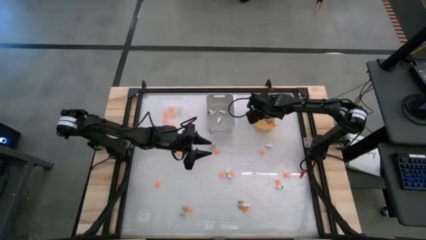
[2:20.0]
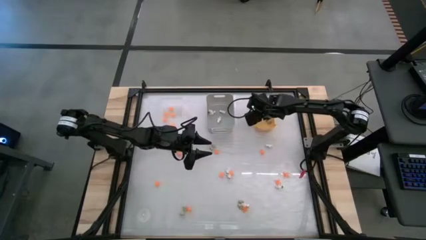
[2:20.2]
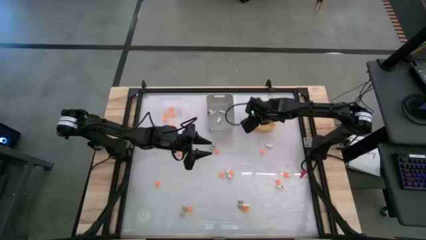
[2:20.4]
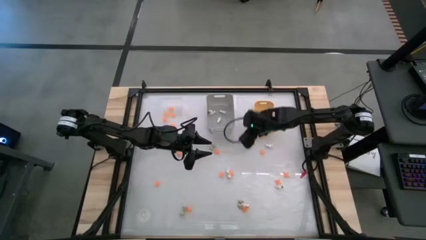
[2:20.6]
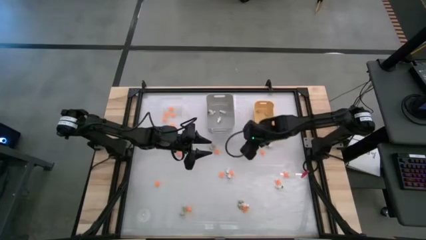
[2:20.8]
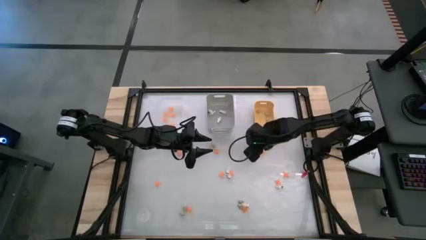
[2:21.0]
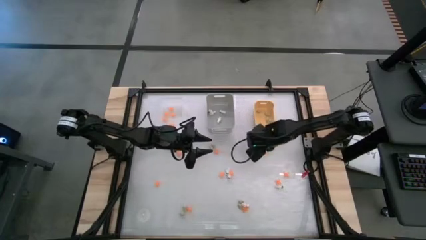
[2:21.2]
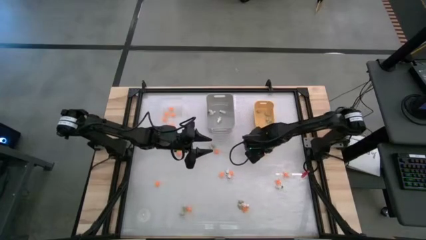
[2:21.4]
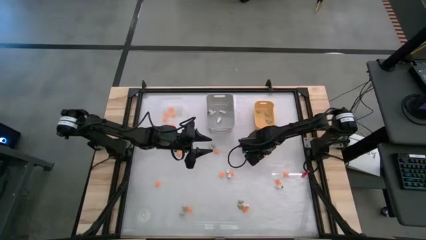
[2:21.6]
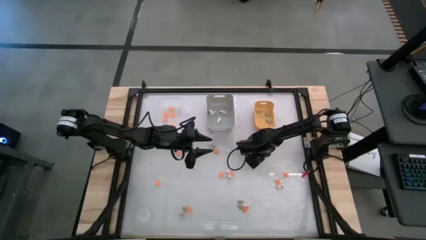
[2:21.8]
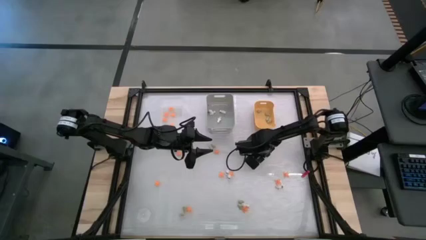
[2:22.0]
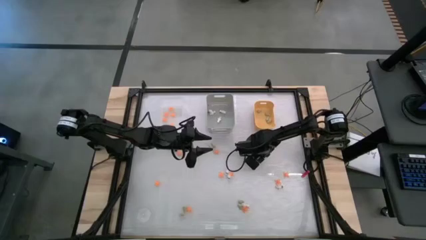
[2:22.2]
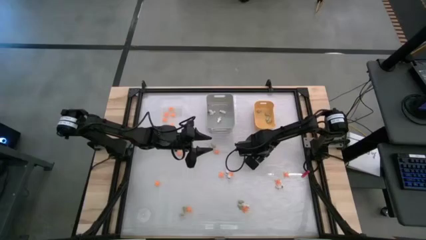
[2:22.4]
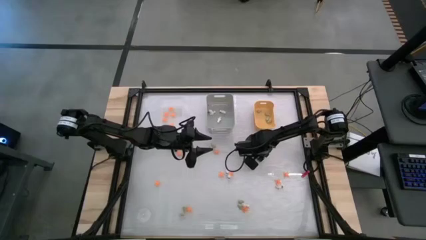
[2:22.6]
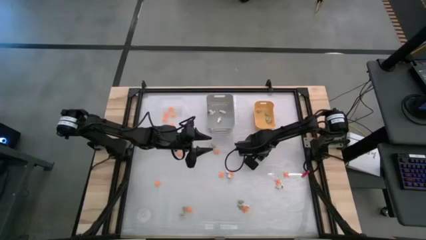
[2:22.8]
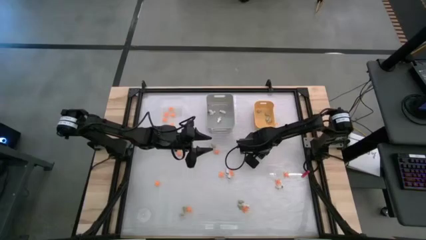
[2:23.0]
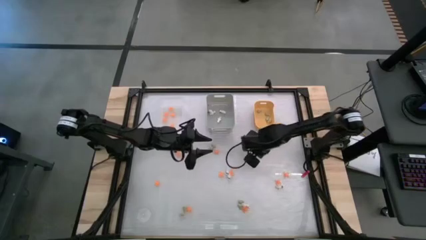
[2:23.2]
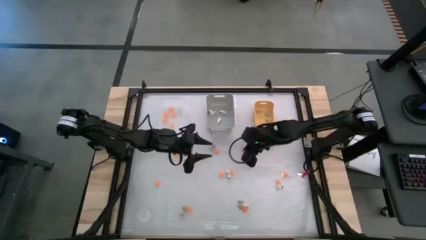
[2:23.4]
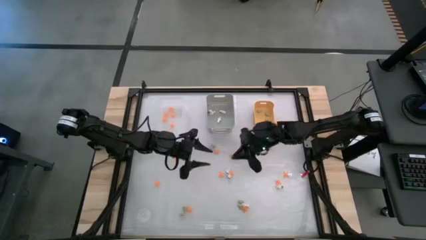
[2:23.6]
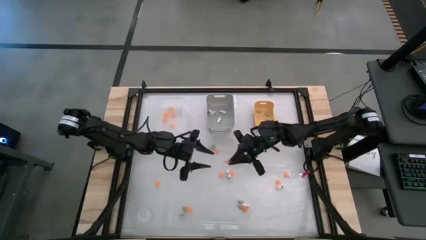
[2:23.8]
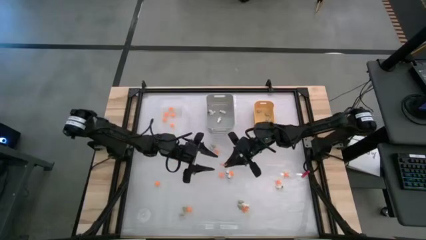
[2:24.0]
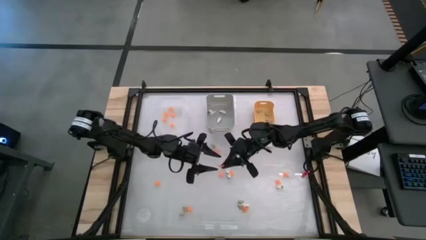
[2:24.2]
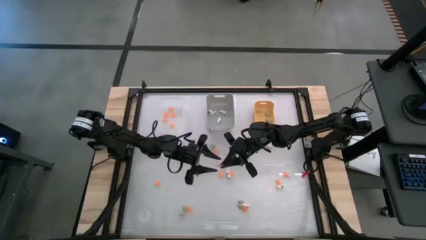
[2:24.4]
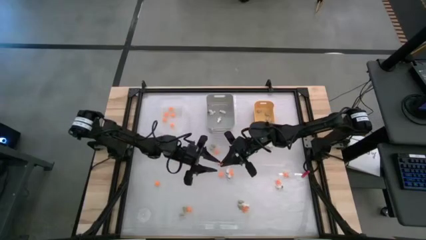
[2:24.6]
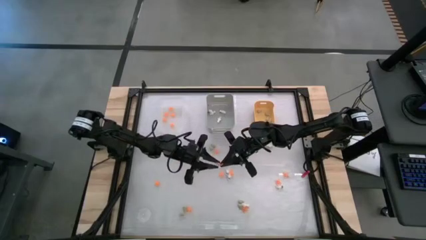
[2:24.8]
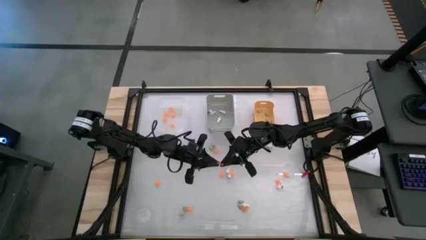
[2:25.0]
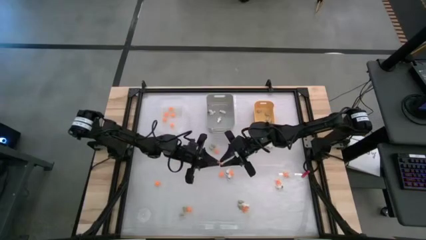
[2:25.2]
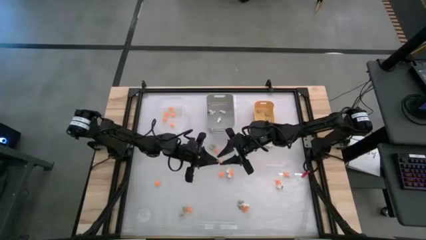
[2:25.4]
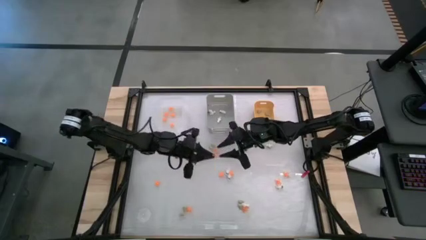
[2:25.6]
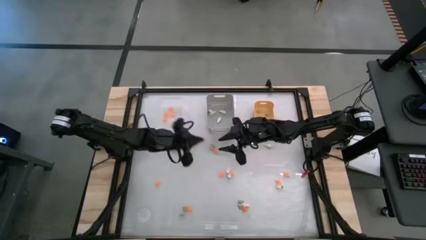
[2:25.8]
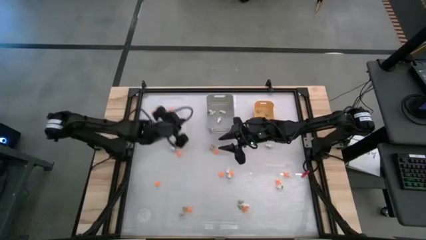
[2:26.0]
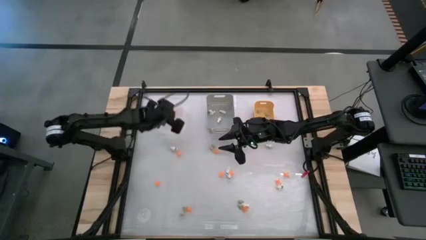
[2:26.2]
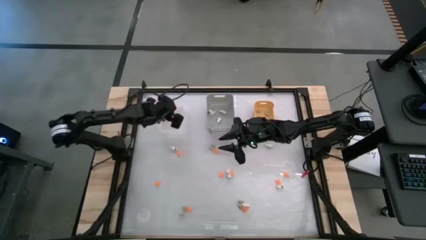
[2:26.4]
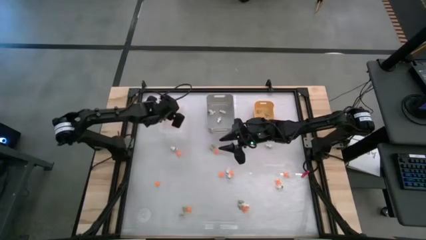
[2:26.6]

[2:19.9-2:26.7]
Task: Sort Halloween decoration
Put the orange spider toy into the transparent white bin

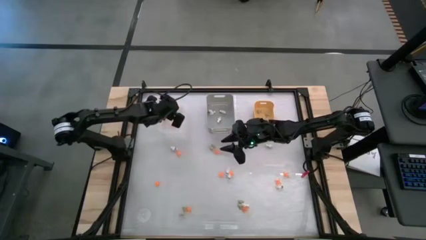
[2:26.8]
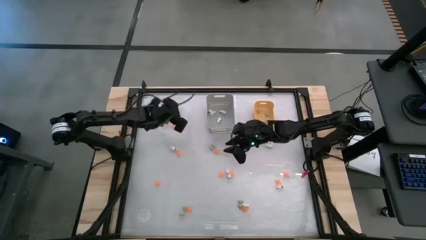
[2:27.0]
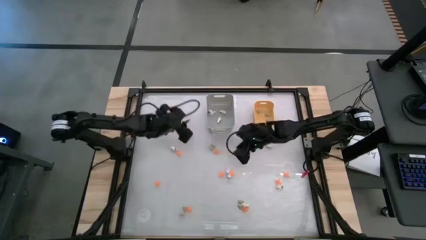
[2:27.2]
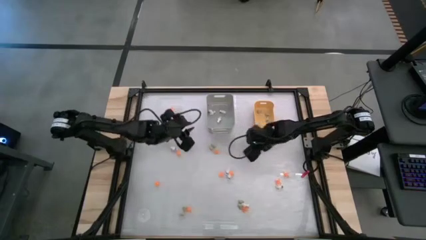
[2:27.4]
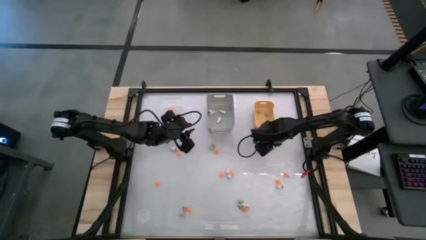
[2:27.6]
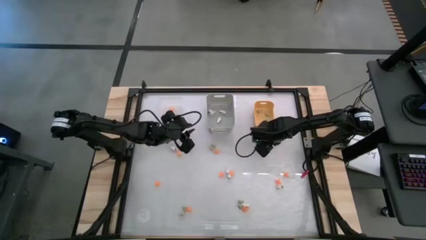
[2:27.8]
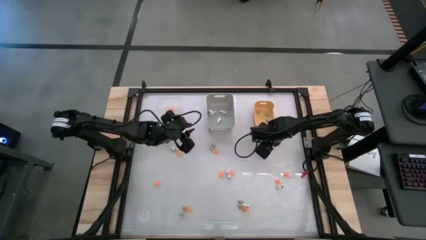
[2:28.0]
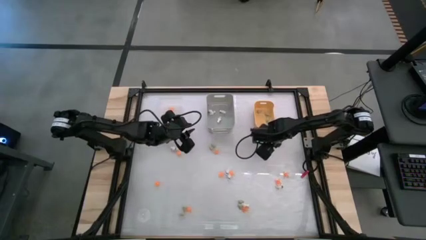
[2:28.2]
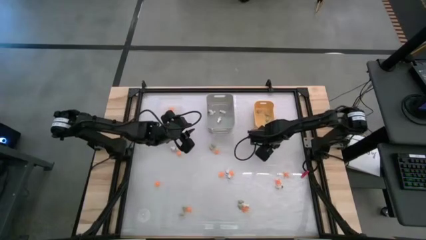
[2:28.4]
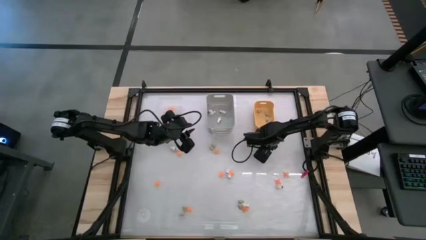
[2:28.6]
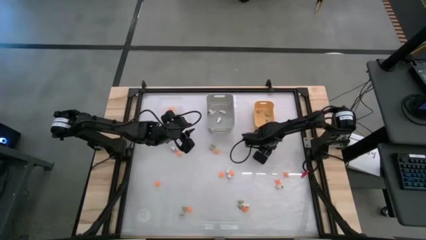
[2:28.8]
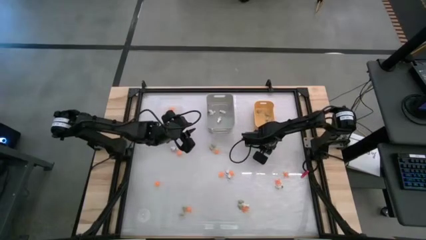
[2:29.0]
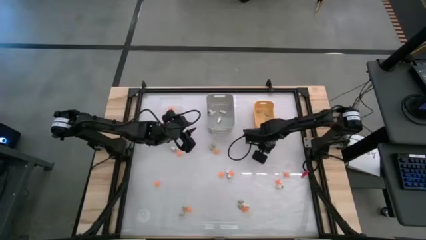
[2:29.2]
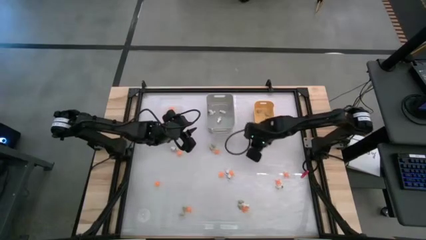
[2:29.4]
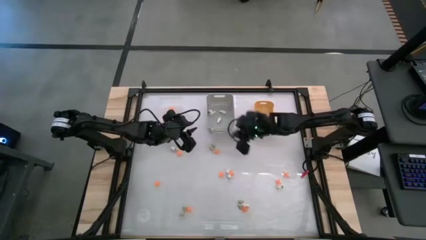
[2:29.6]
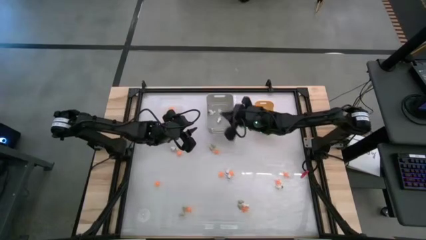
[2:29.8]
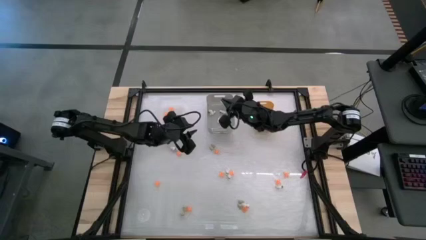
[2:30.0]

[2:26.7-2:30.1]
Put the white skeleton toy into the gray bin

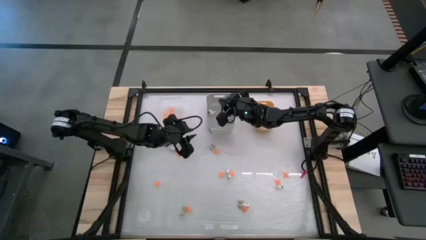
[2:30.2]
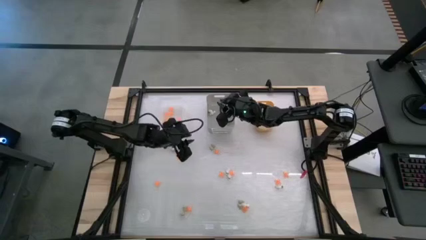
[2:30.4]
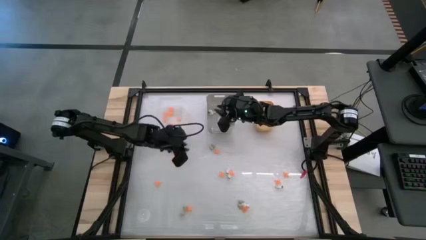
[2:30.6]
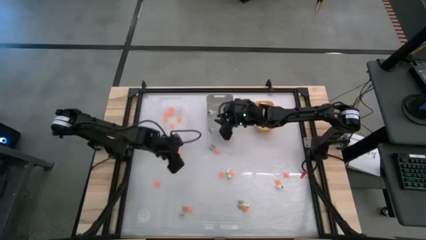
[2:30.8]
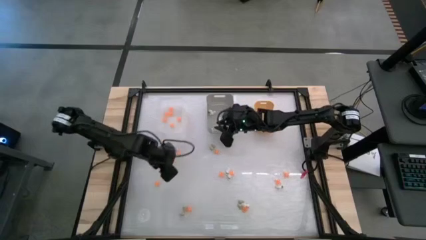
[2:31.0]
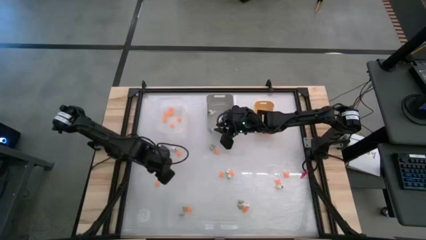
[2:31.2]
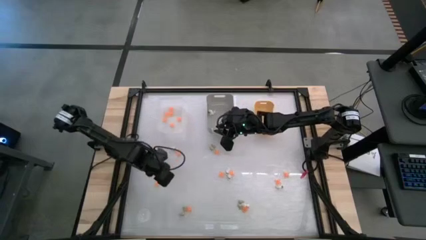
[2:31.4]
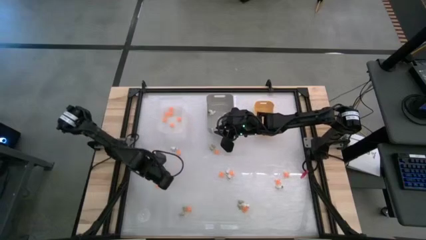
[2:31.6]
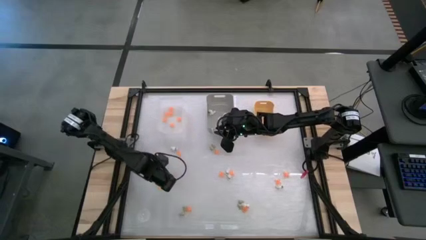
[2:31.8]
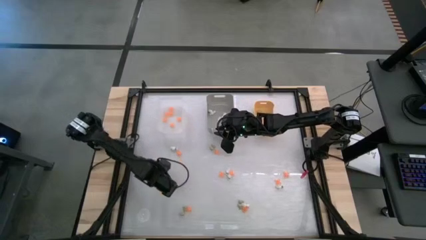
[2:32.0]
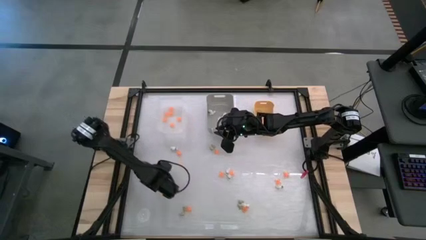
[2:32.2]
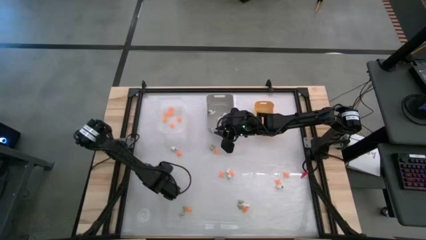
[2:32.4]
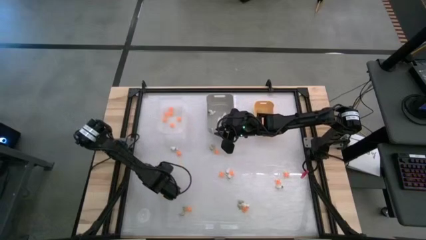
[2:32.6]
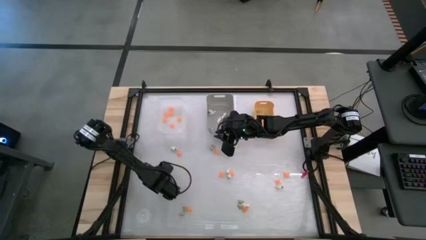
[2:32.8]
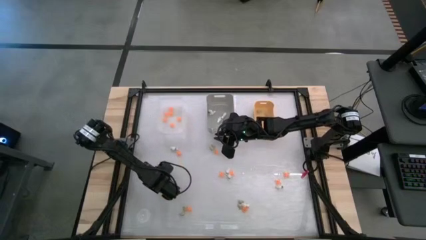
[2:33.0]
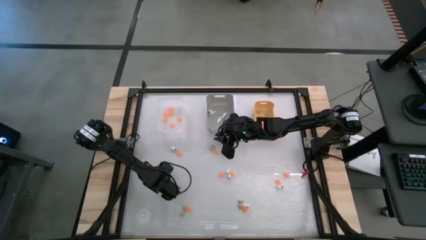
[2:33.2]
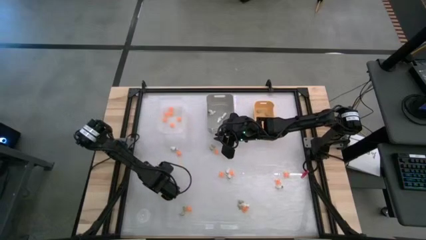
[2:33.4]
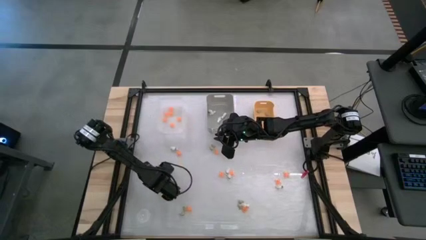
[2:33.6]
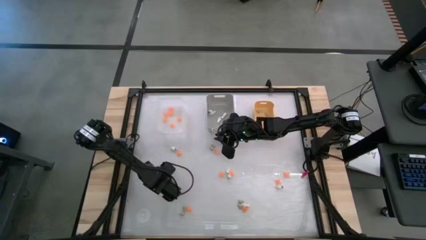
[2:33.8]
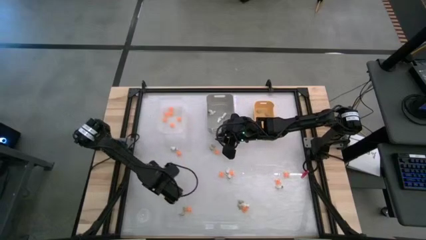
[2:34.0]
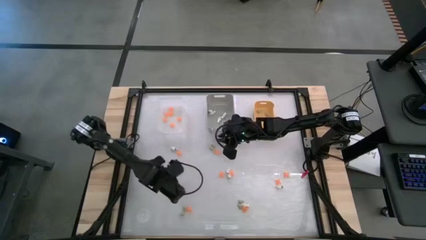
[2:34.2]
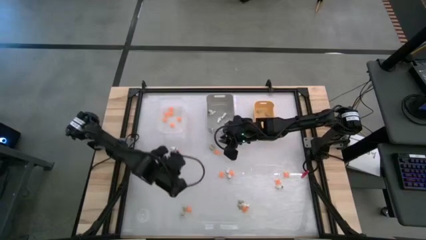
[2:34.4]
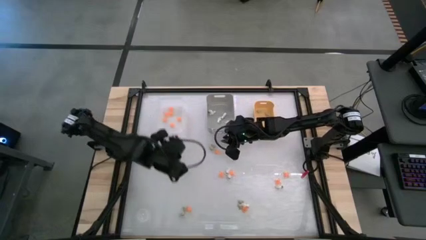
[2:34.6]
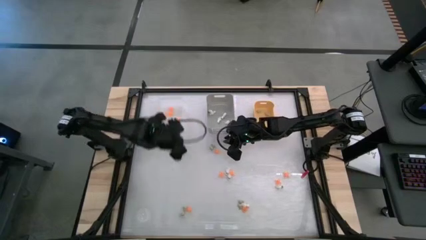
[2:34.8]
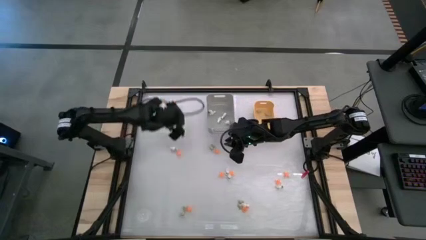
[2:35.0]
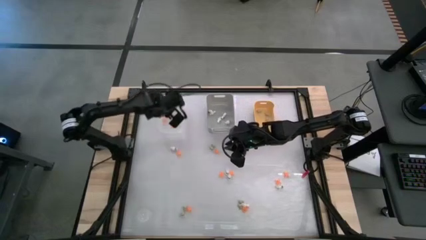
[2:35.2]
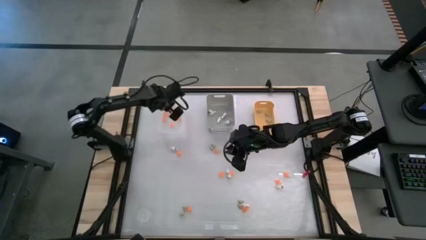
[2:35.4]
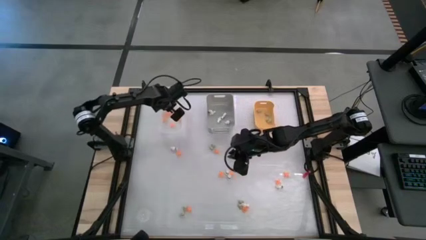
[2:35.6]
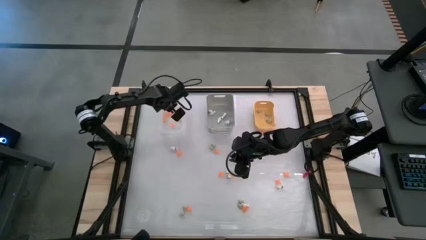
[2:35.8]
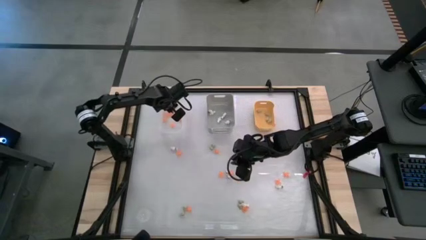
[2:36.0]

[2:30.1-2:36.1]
Put the orange spider toy into the transparent white bin
